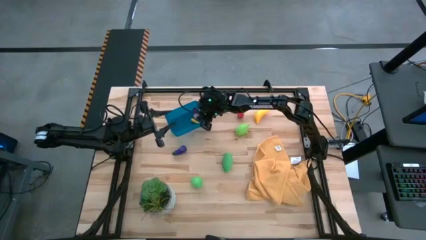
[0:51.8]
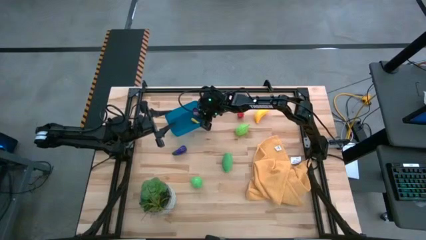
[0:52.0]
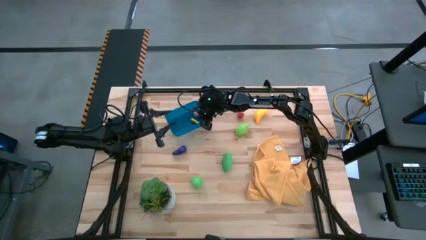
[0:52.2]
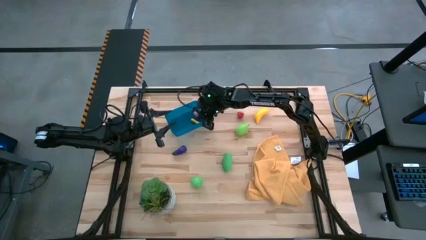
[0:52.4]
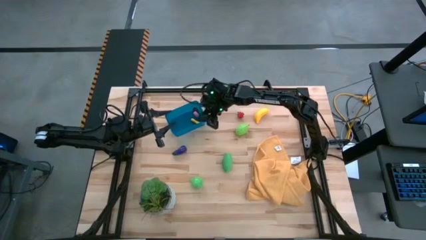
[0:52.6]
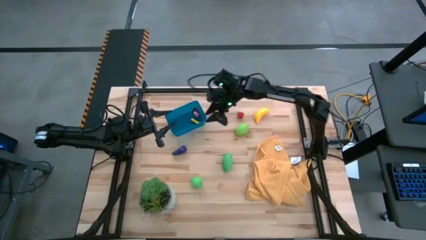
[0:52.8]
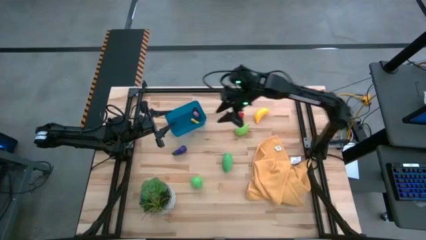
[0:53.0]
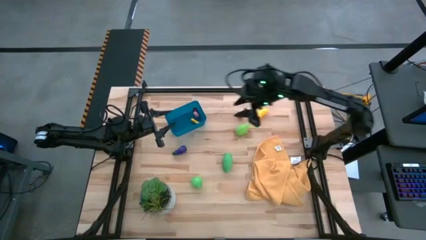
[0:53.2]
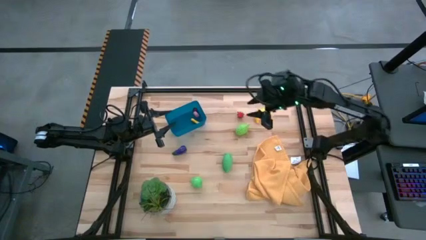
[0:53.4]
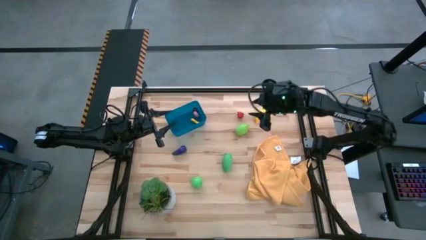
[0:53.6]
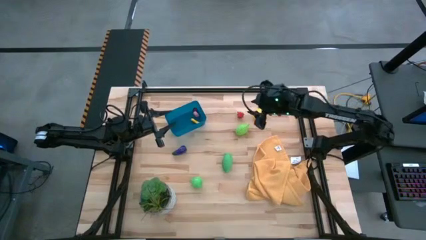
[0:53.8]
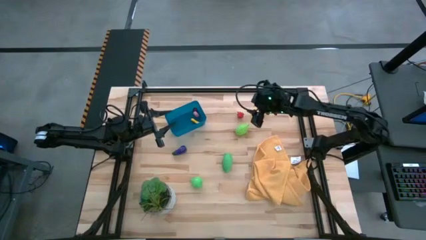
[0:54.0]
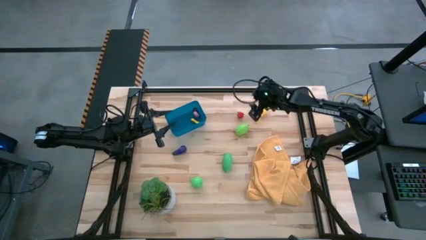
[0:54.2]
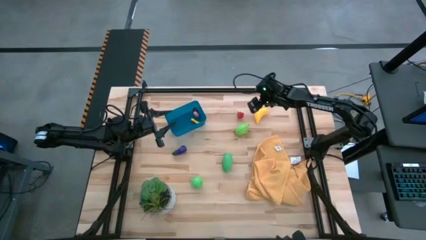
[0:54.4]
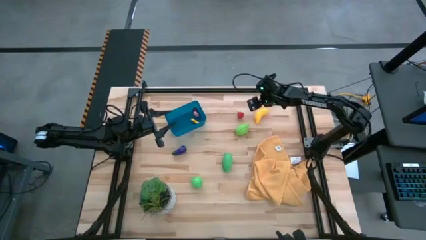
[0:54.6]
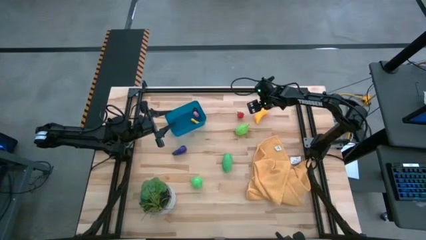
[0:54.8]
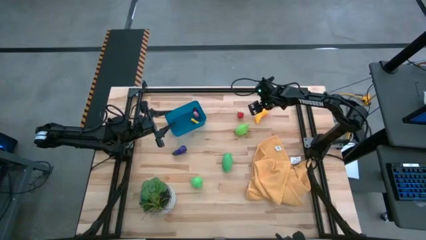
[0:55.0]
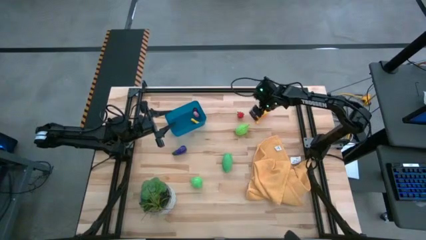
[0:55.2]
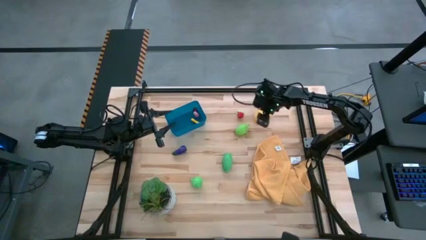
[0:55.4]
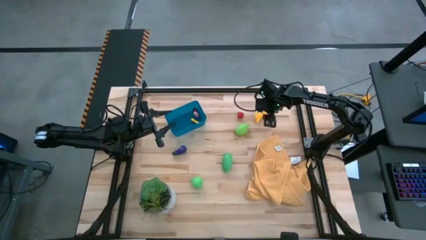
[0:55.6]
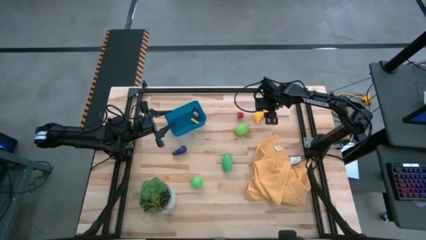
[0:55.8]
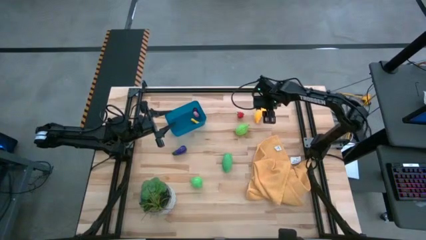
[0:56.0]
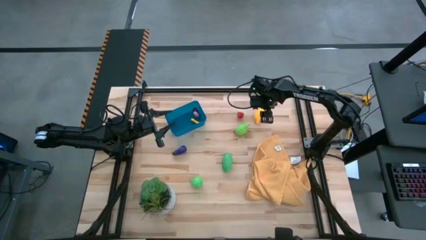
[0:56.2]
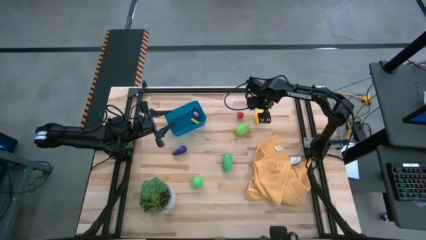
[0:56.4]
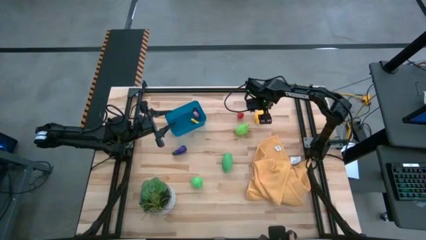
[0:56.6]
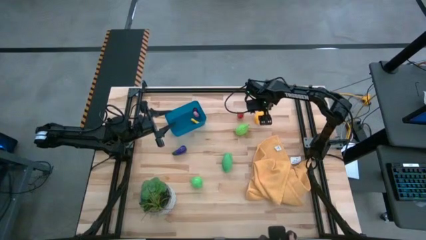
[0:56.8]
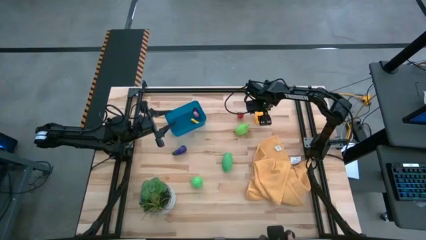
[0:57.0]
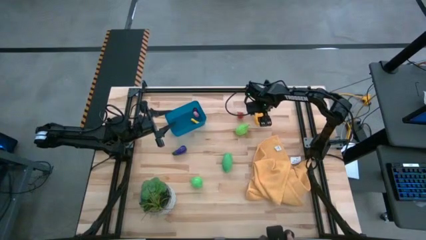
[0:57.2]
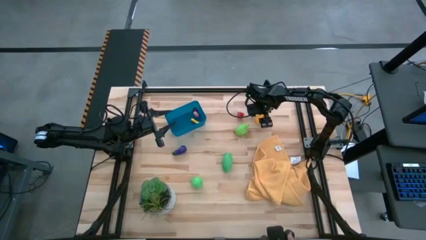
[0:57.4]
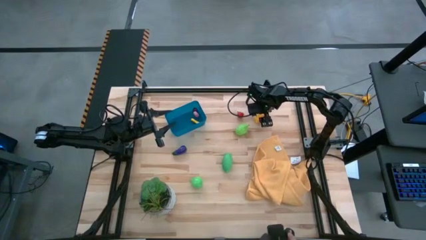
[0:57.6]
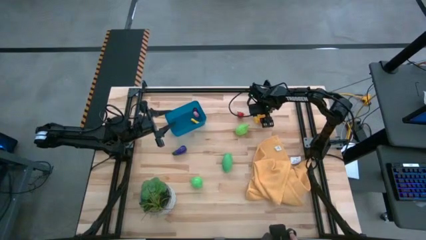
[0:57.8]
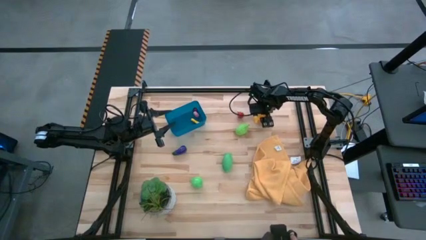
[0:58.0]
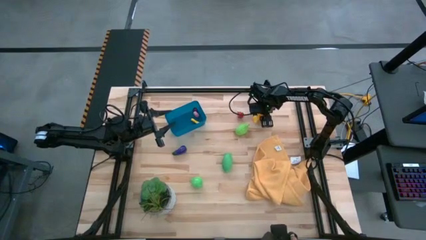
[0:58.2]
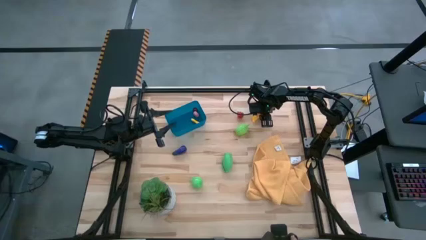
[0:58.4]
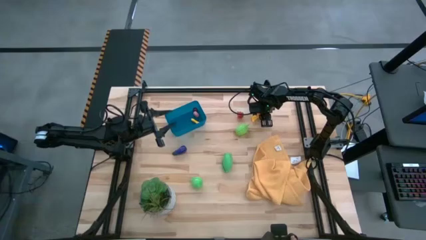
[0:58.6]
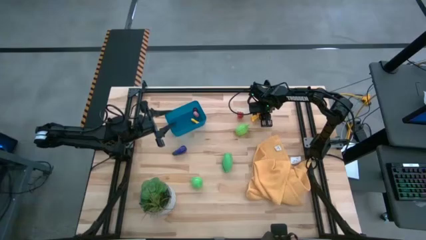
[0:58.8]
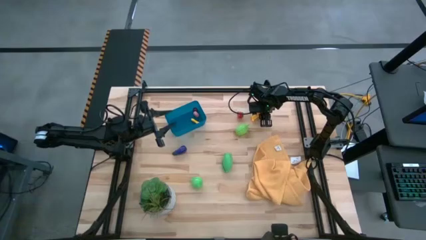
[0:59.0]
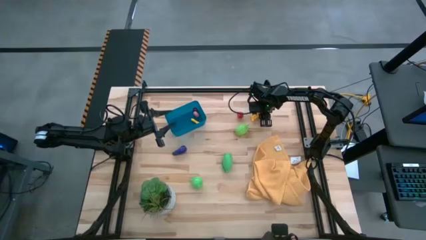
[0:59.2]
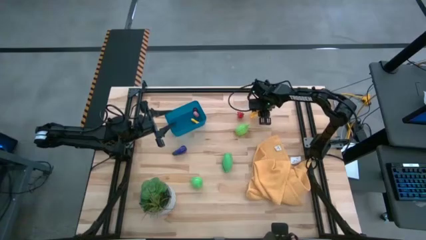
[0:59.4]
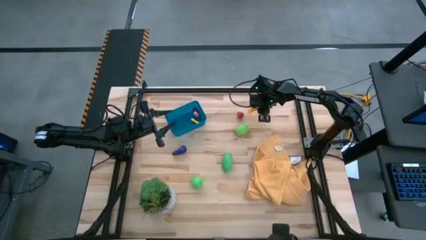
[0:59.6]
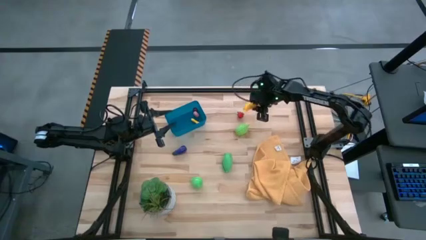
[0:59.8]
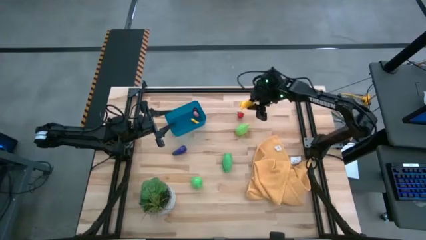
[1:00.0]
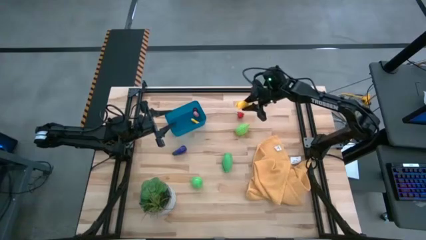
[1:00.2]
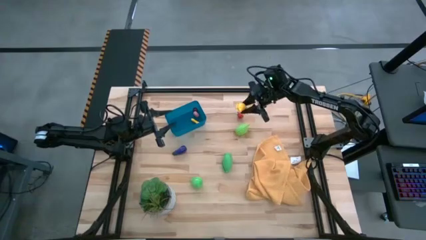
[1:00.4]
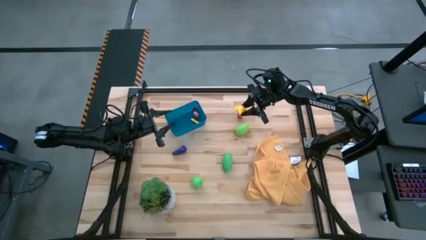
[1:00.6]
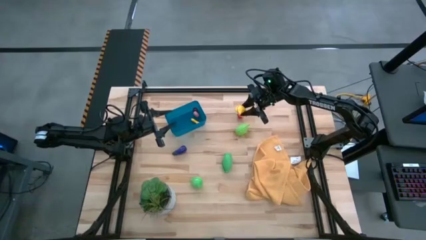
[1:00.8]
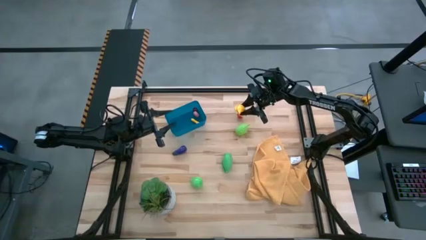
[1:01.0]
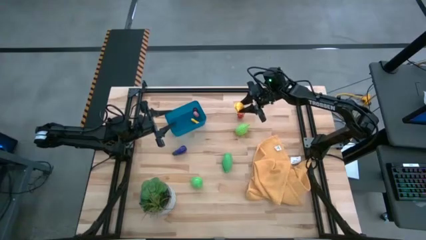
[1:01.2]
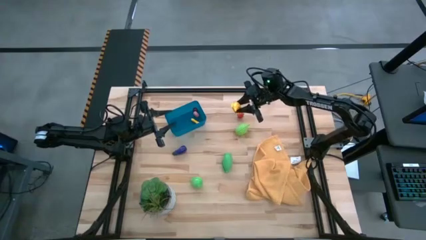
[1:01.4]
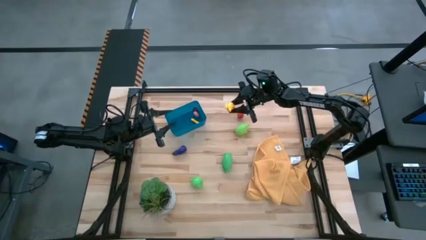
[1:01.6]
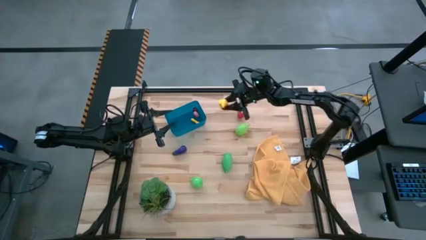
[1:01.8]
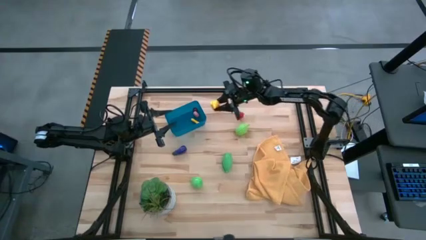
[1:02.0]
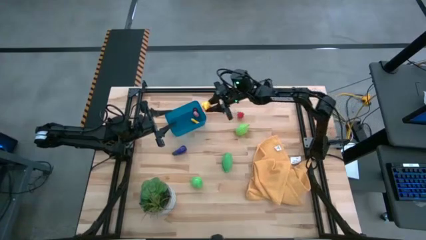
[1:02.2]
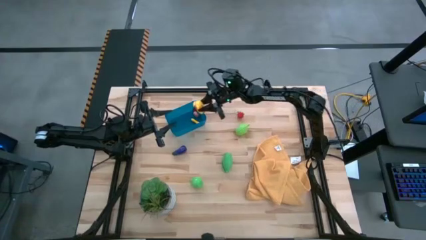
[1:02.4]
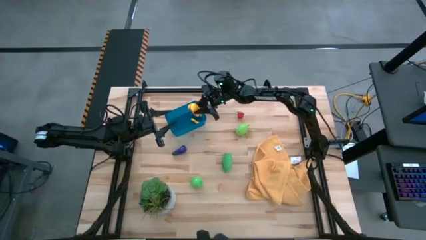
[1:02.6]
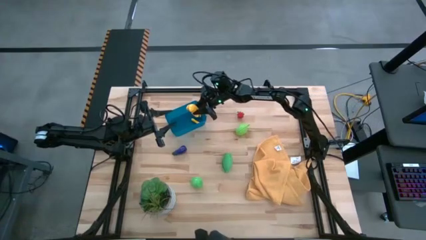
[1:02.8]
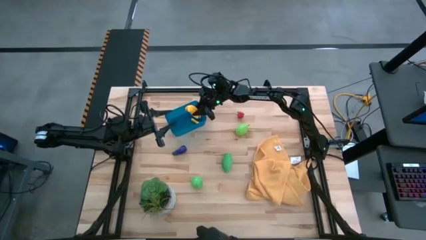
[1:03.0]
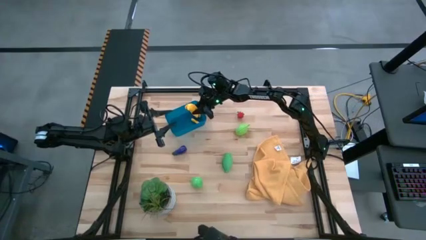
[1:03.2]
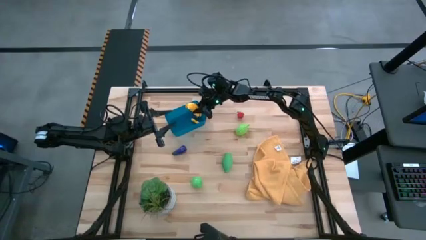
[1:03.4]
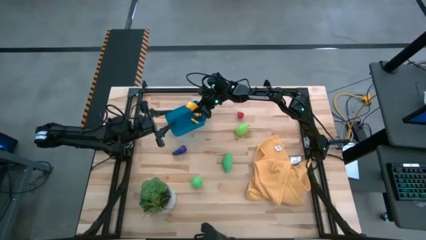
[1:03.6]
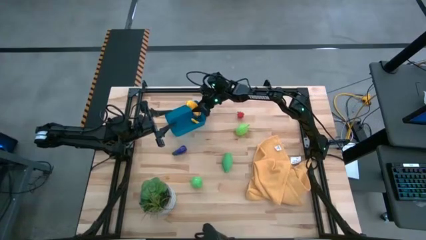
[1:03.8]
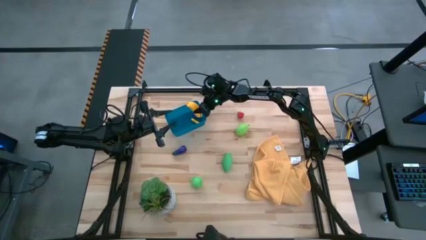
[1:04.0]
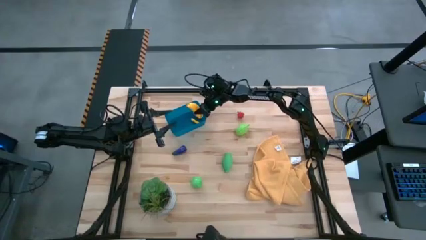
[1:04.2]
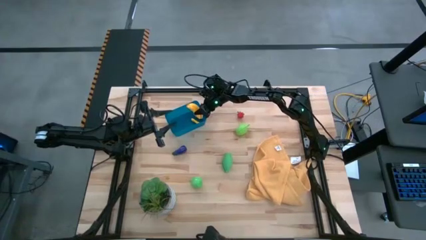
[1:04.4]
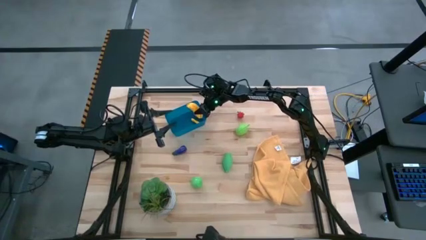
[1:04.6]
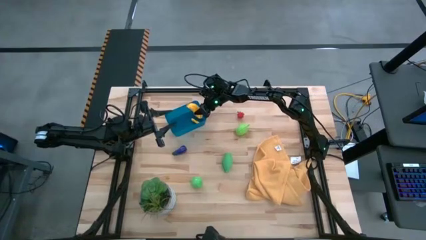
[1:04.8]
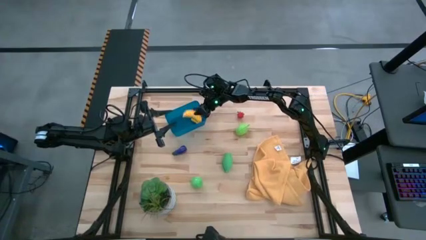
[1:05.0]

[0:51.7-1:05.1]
Task: Pick and placing Produce into tupperware
Put the banana into the blue bin

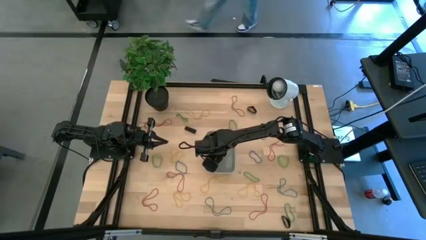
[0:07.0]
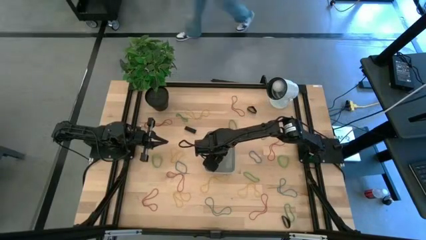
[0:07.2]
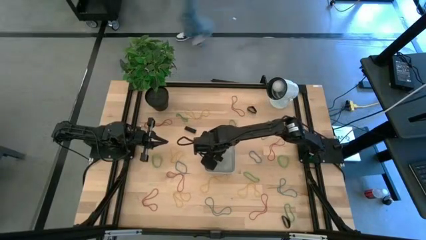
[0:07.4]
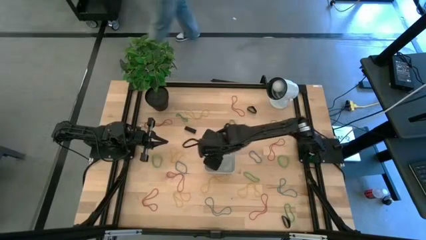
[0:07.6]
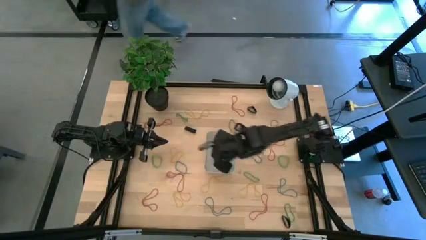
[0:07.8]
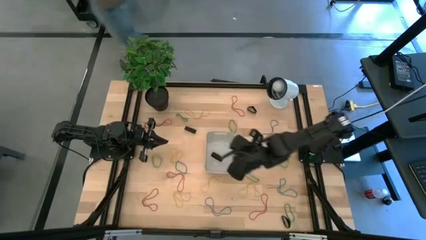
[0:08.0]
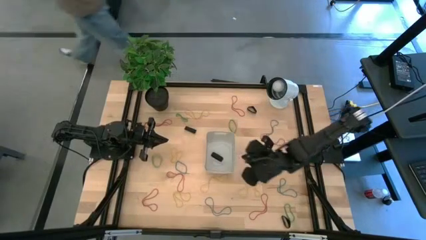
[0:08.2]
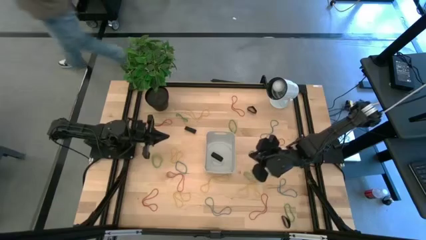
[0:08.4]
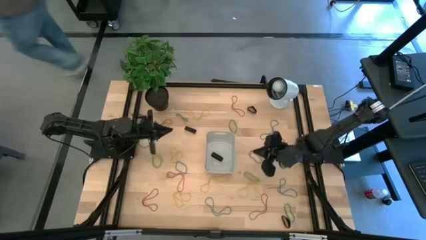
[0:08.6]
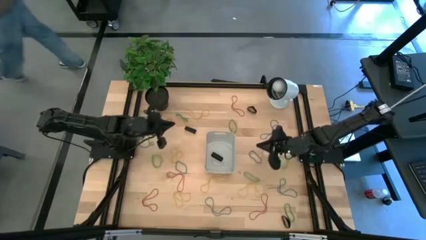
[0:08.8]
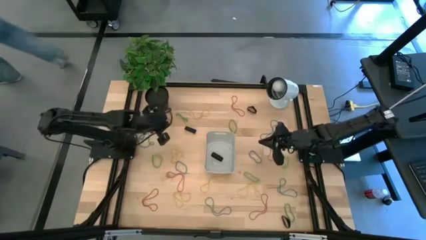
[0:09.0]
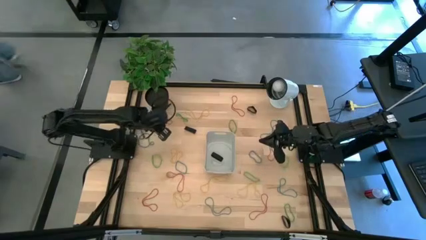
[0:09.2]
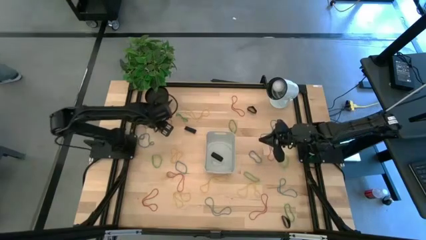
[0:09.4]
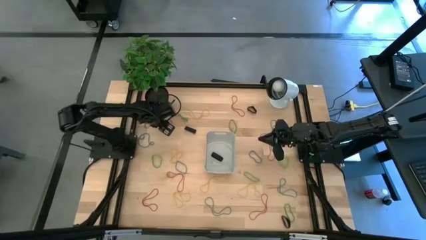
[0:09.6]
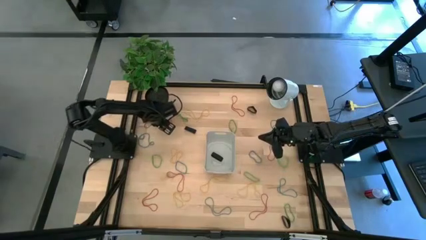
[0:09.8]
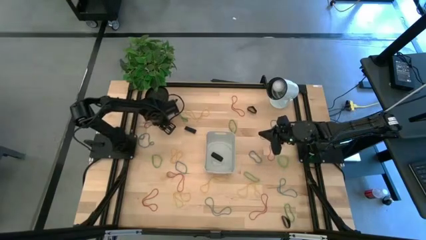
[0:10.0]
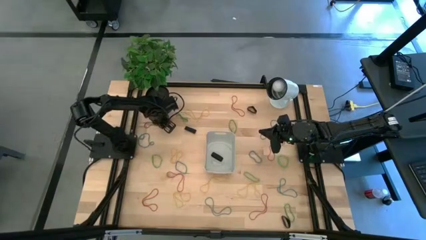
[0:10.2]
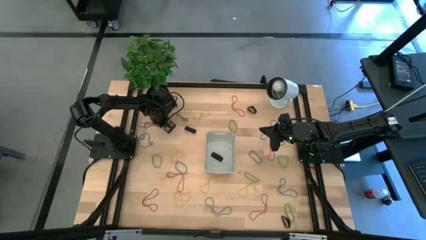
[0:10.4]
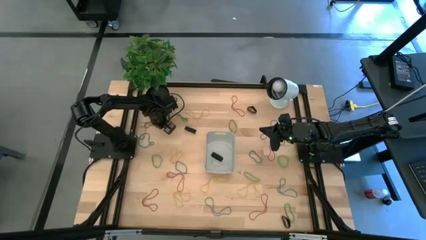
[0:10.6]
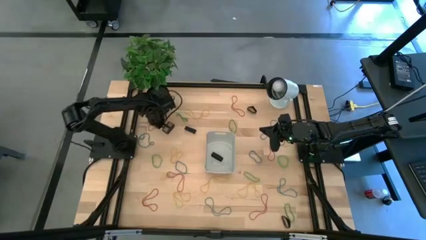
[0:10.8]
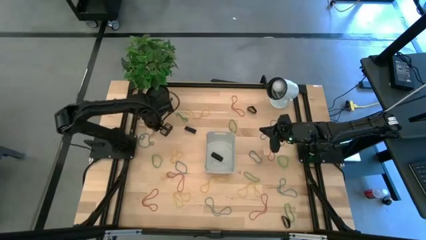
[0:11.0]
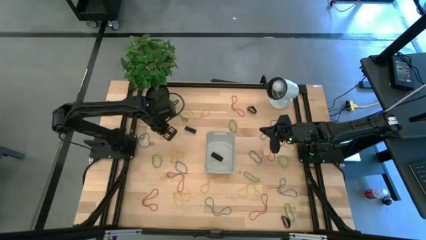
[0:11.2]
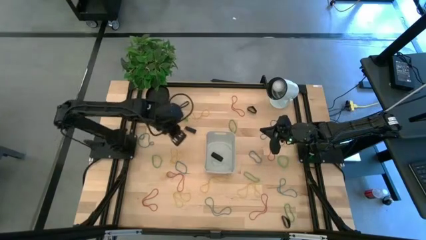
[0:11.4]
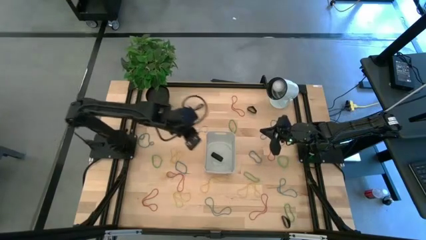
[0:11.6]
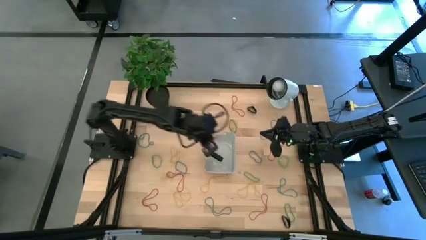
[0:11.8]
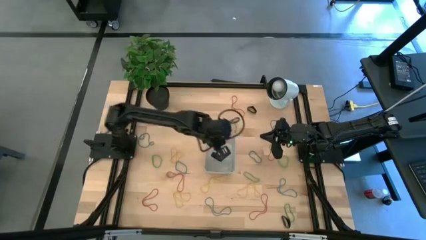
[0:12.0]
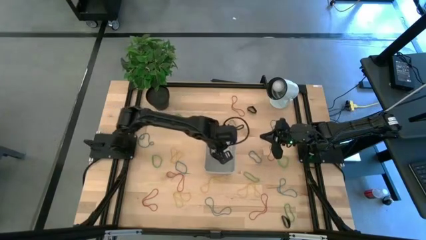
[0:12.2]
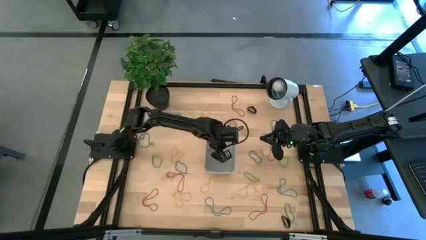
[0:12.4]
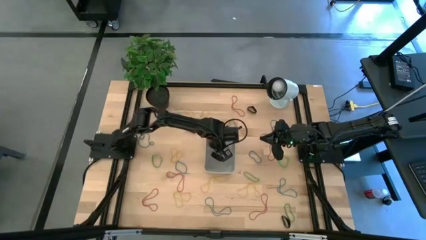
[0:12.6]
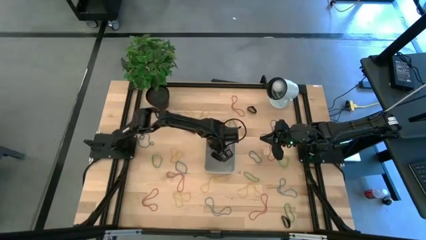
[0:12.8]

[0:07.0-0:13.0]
Task: Pick and place rubber bands into bin
Put the red rubber band into the gray bin
